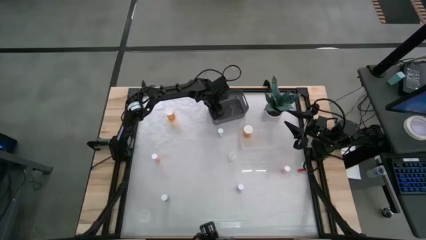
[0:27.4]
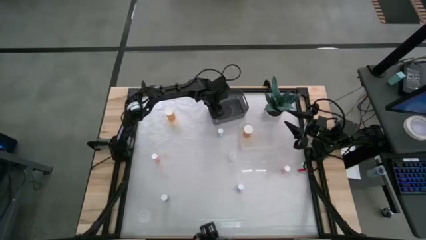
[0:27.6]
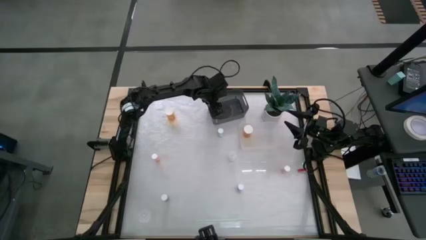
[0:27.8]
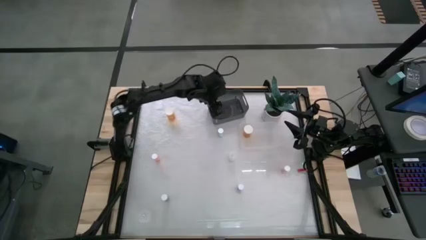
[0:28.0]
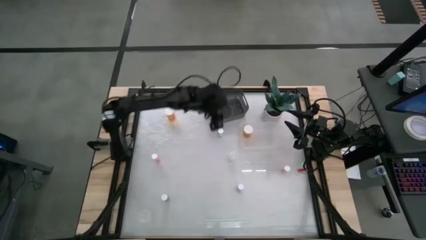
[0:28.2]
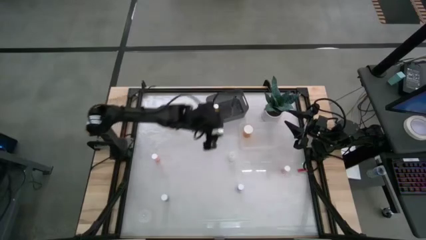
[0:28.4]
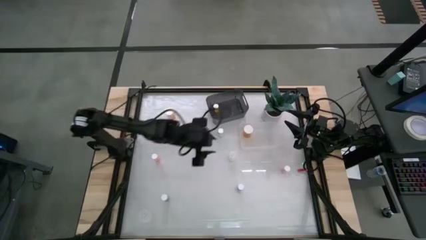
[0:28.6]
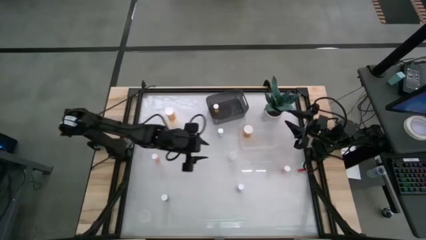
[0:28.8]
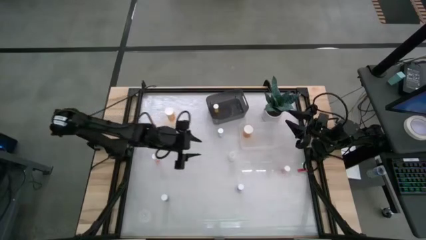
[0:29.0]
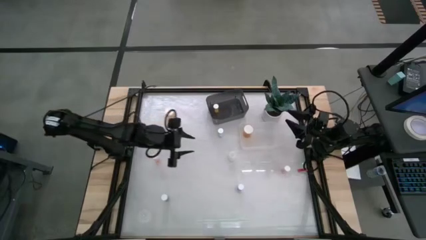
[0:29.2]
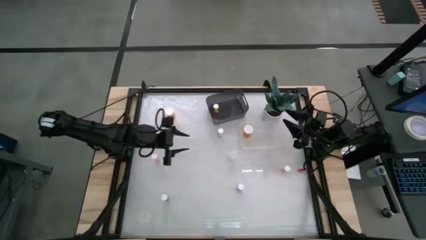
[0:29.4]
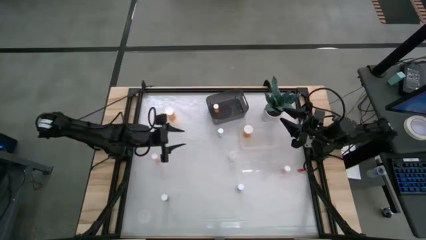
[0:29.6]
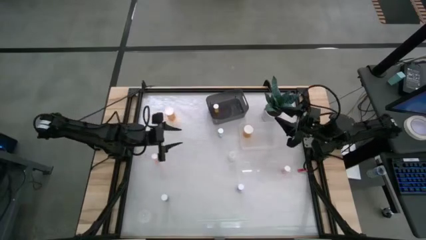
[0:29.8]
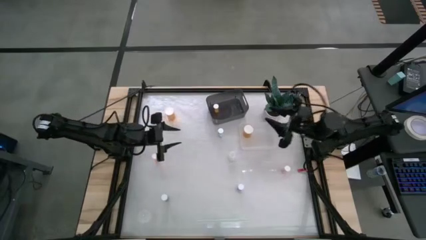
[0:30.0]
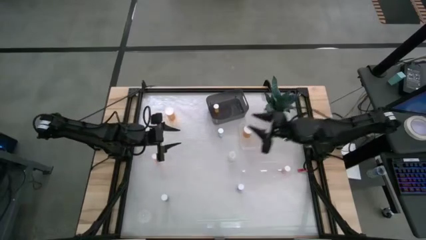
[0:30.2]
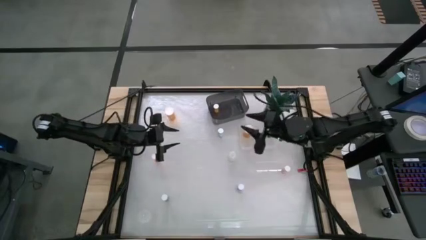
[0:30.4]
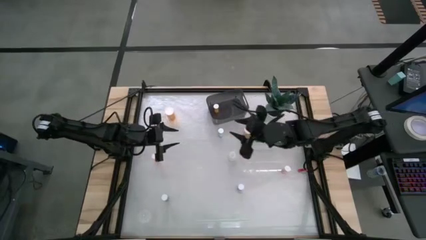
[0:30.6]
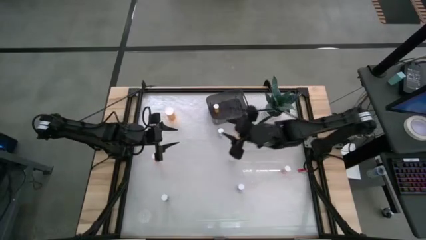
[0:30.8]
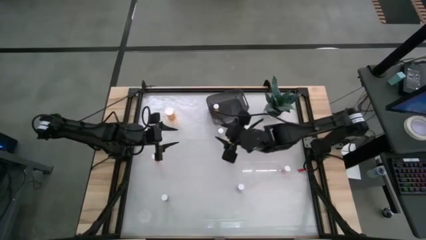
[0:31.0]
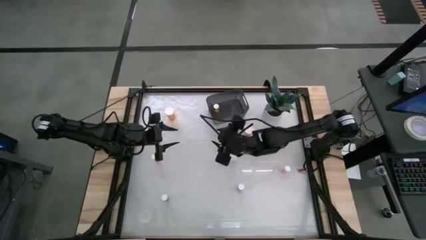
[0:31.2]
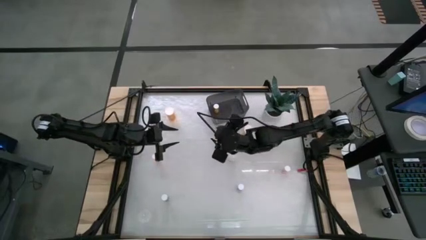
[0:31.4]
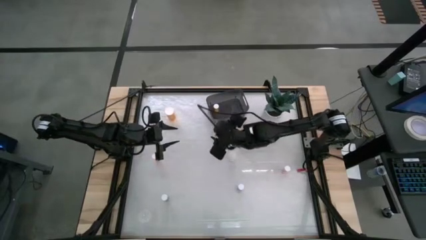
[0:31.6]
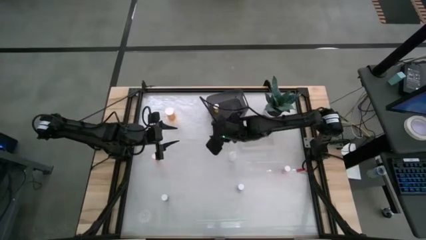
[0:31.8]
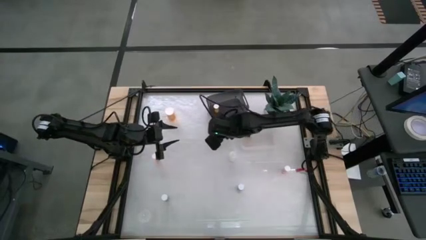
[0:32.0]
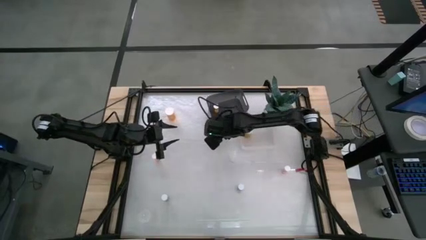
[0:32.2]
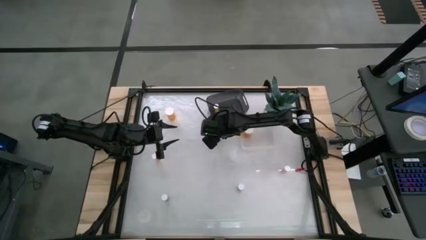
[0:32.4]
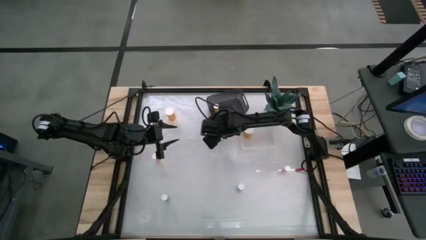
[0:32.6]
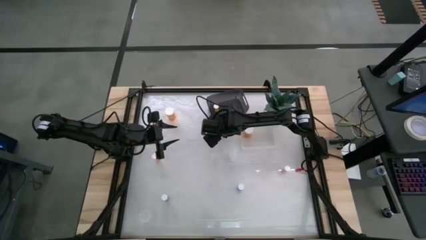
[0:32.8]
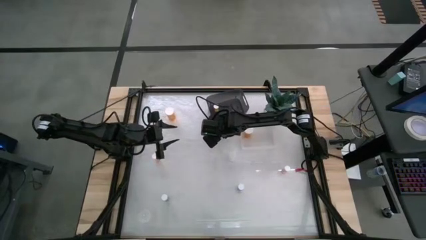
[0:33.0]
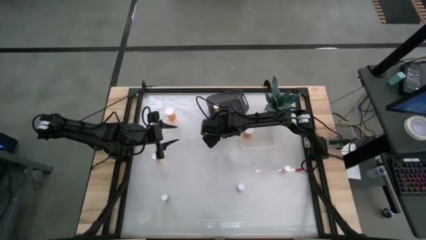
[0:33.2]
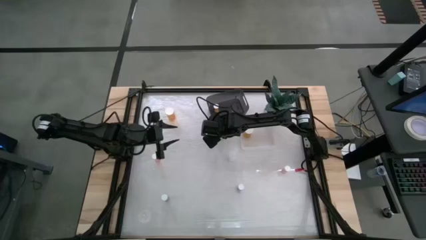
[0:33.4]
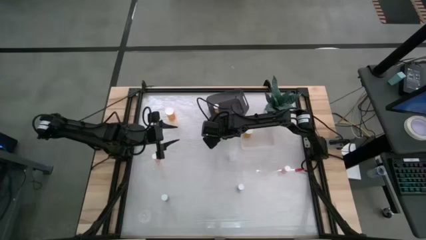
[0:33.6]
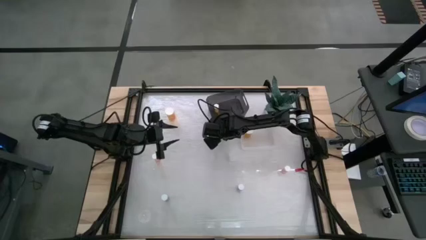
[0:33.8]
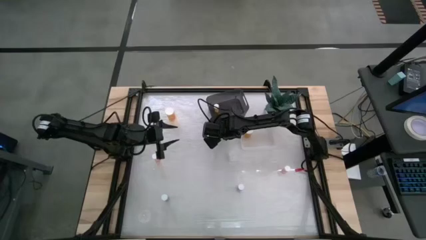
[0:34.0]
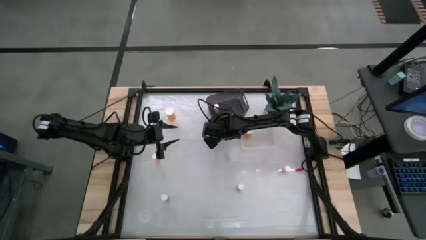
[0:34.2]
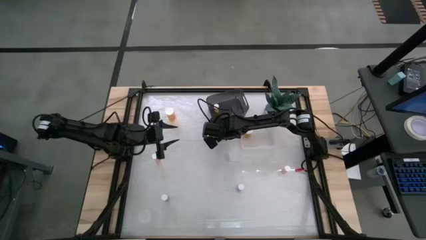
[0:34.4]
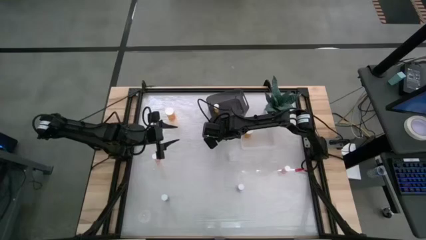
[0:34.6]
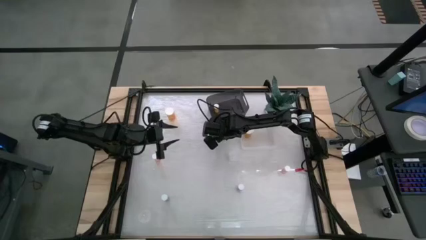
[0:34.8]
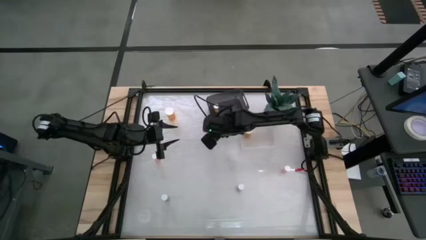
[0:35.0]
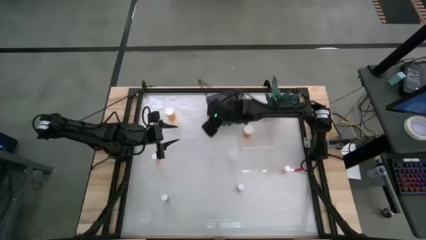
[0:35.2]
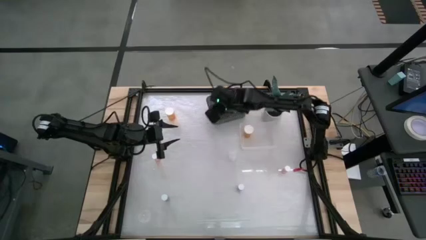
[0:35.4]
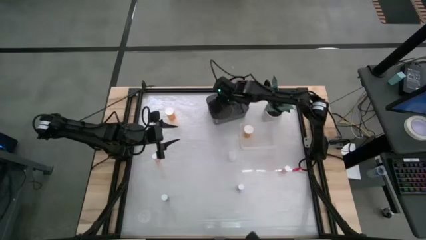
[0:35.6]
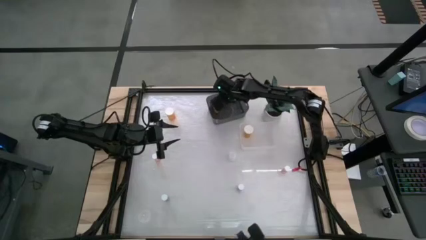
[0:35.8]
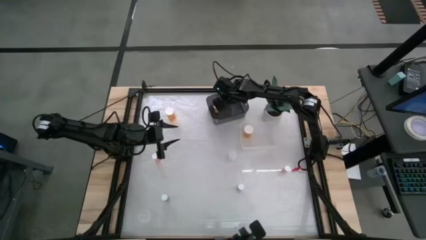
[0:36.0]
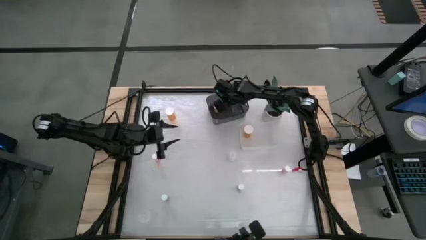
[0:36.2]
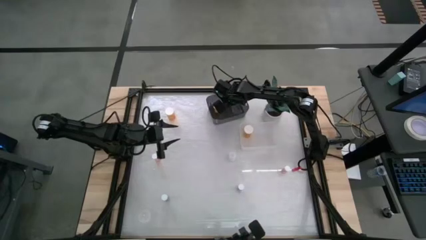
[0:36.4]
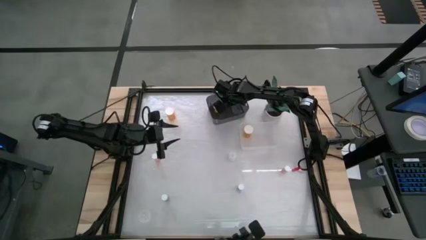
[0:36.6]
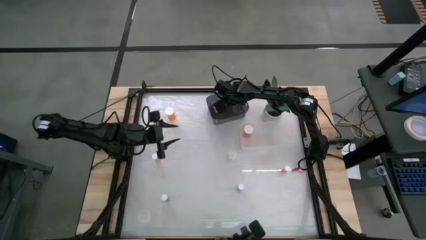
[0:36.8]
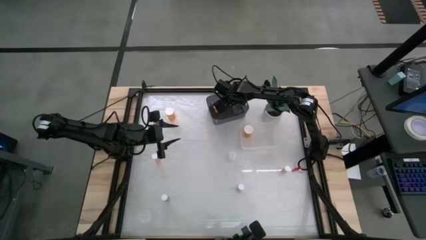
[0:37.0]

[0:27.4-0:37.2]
Task: Pick and place medicine bottles into bin by pill shape (circle, oval)
Put the top right blue pill bottle into the black bin
